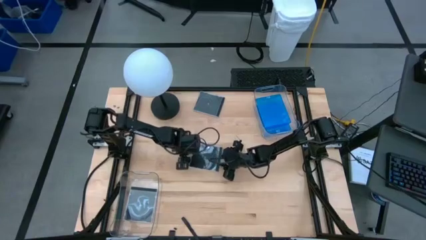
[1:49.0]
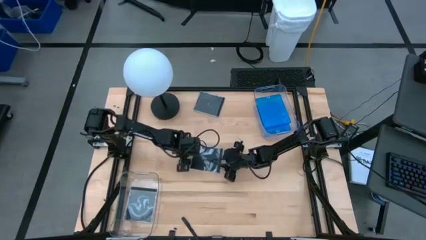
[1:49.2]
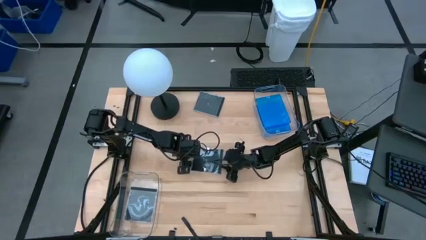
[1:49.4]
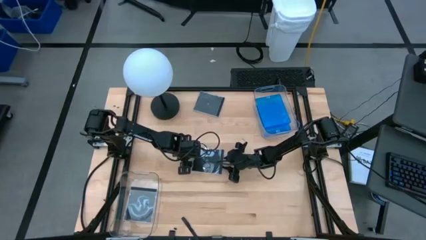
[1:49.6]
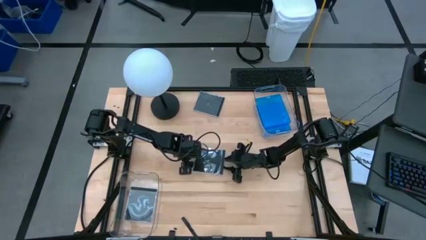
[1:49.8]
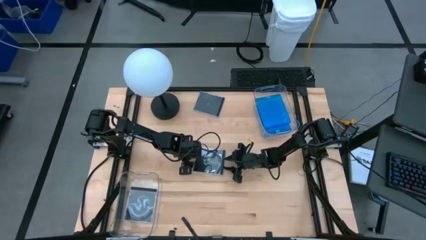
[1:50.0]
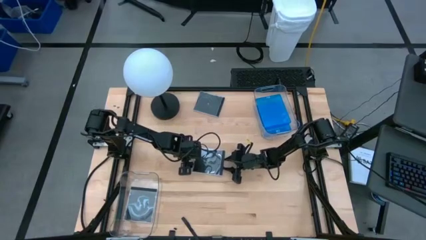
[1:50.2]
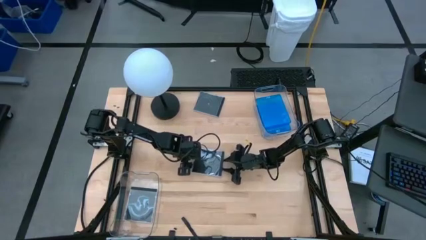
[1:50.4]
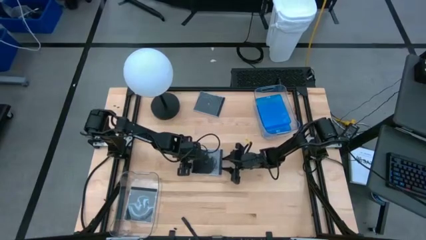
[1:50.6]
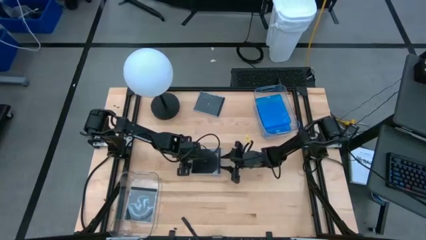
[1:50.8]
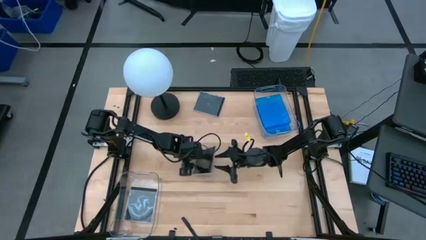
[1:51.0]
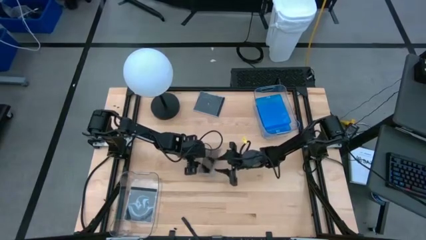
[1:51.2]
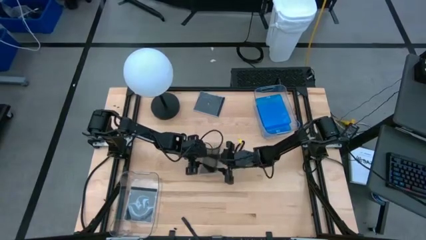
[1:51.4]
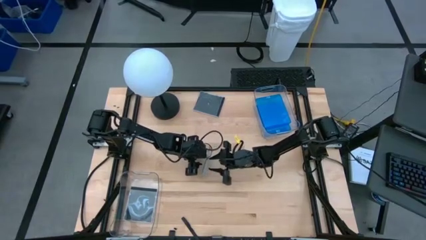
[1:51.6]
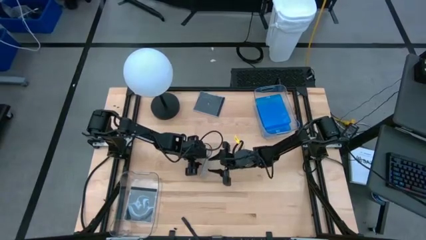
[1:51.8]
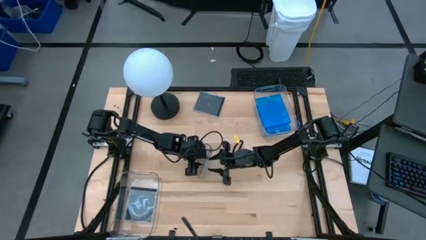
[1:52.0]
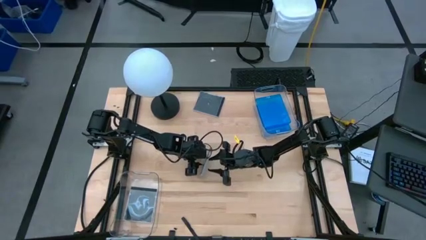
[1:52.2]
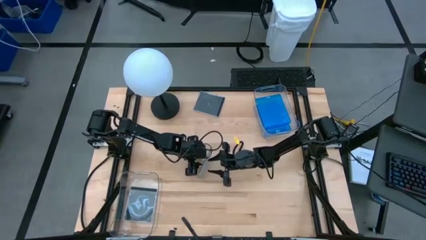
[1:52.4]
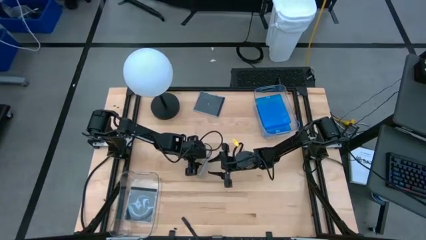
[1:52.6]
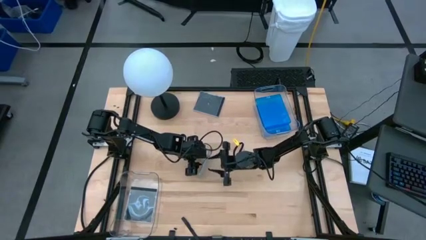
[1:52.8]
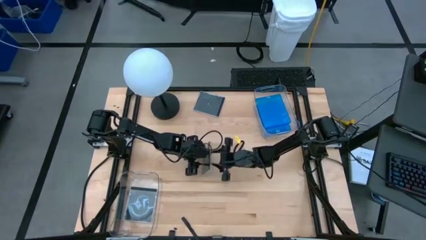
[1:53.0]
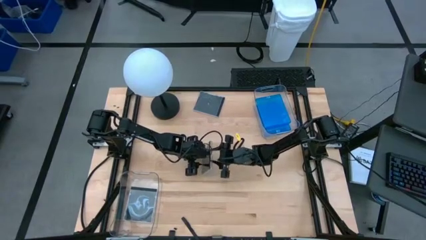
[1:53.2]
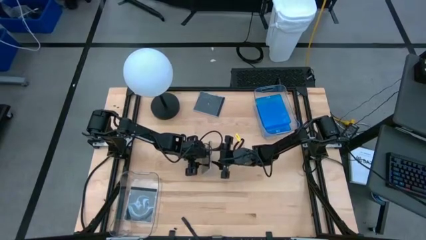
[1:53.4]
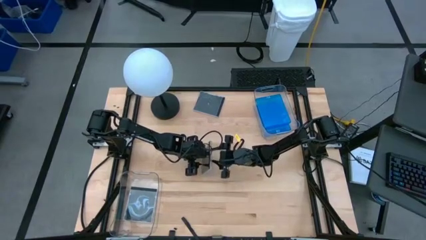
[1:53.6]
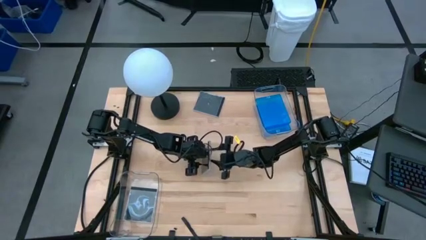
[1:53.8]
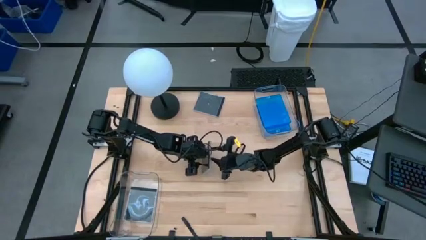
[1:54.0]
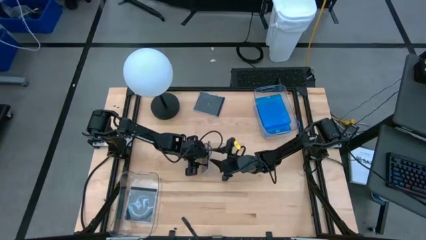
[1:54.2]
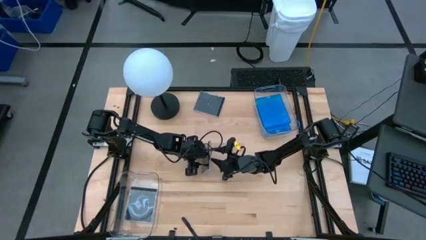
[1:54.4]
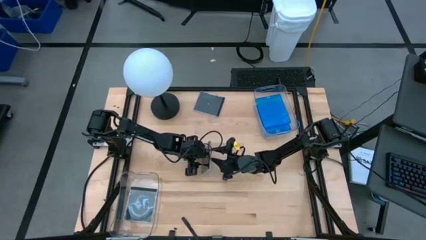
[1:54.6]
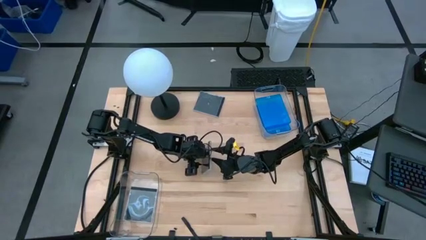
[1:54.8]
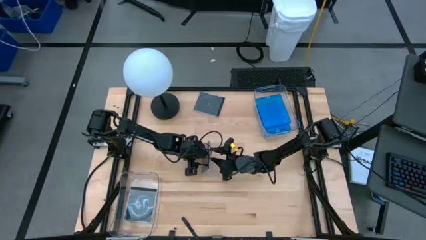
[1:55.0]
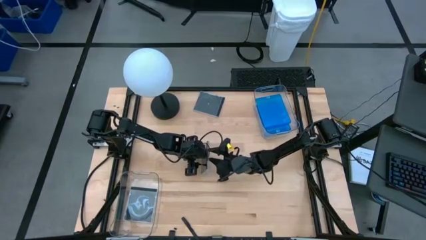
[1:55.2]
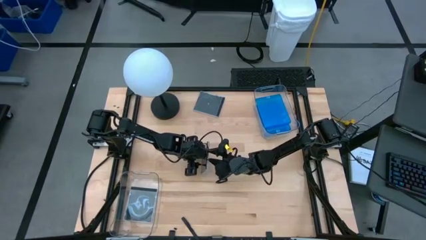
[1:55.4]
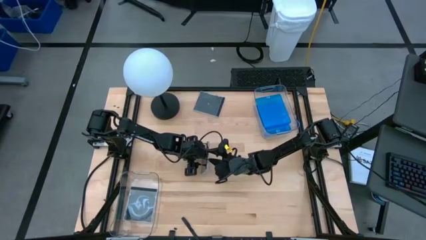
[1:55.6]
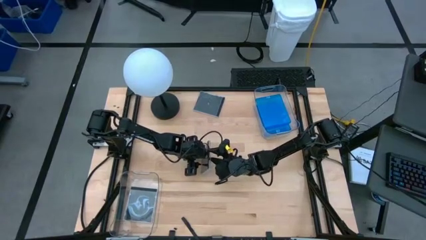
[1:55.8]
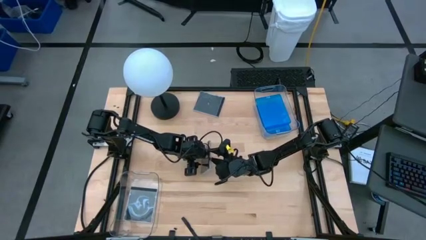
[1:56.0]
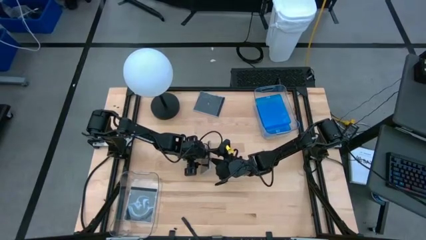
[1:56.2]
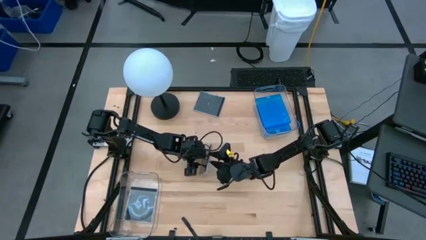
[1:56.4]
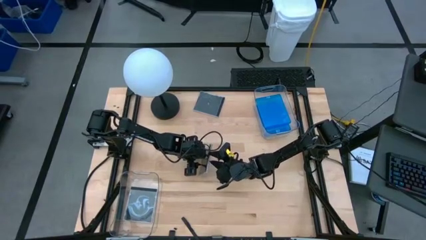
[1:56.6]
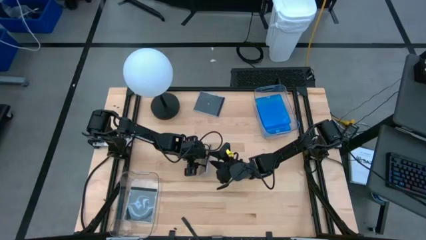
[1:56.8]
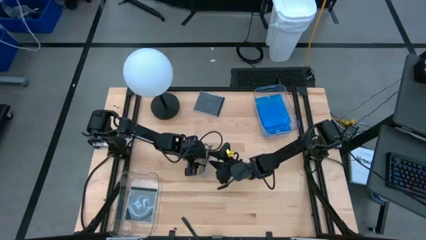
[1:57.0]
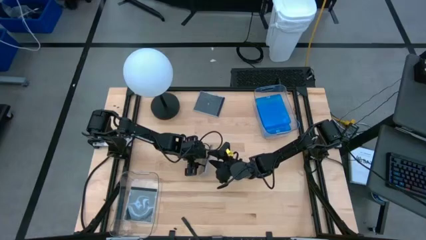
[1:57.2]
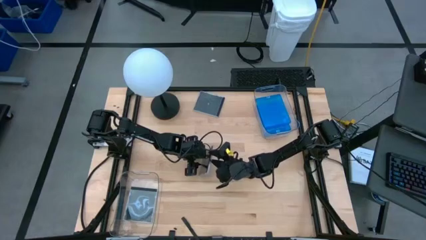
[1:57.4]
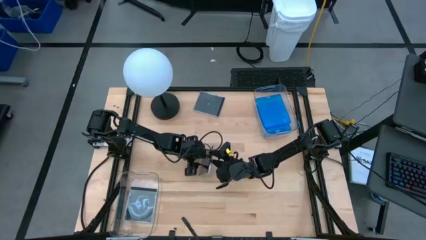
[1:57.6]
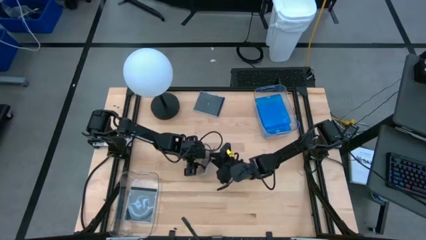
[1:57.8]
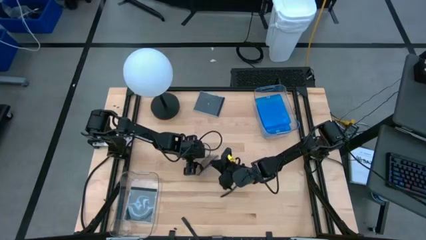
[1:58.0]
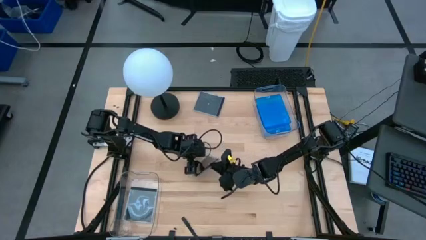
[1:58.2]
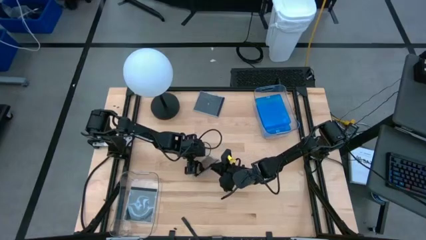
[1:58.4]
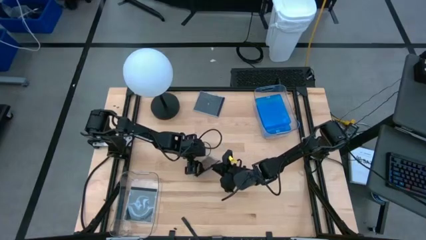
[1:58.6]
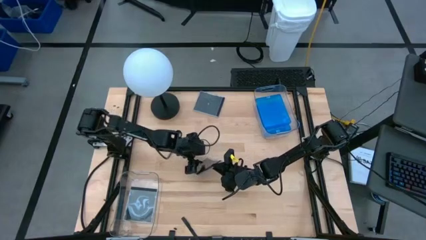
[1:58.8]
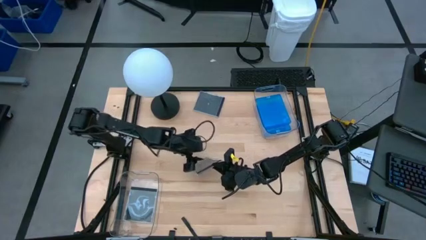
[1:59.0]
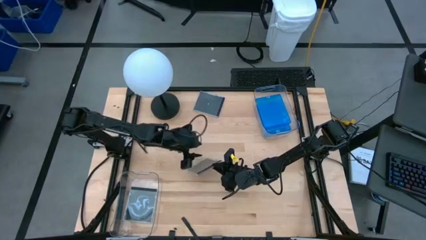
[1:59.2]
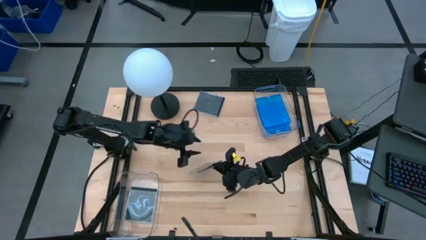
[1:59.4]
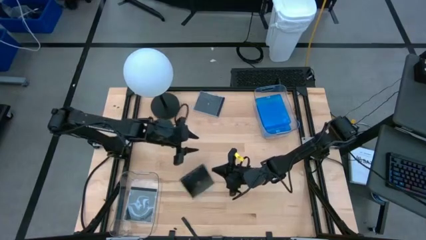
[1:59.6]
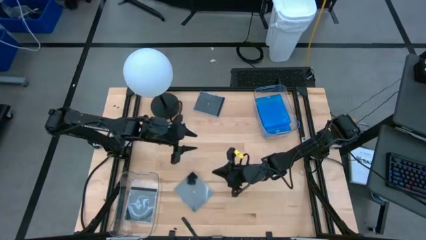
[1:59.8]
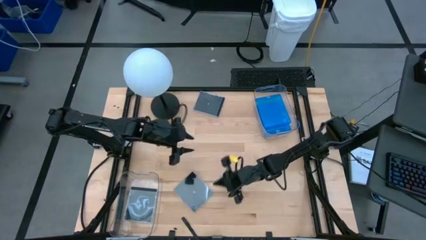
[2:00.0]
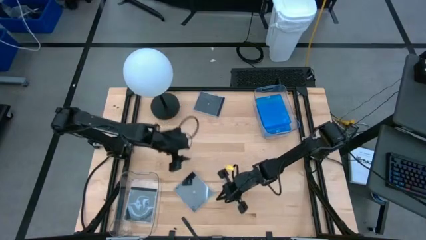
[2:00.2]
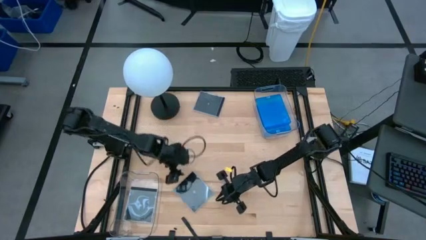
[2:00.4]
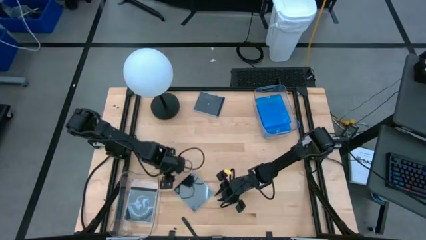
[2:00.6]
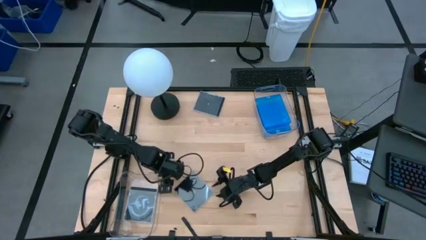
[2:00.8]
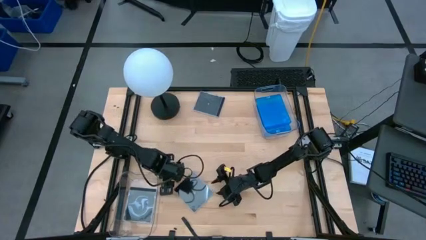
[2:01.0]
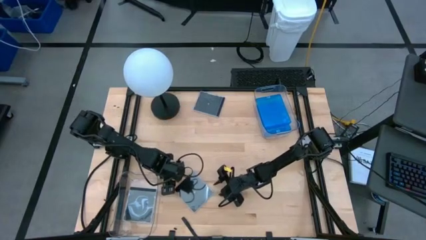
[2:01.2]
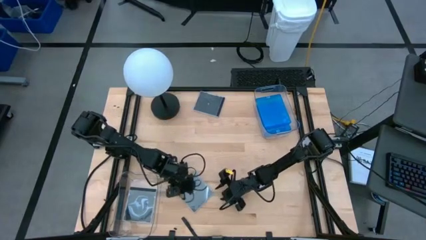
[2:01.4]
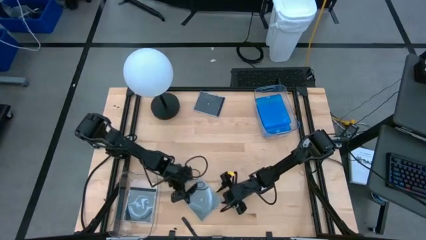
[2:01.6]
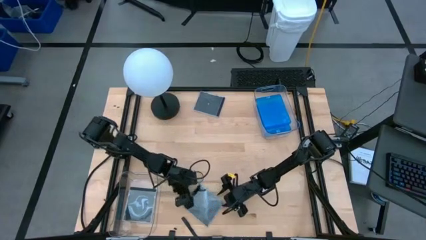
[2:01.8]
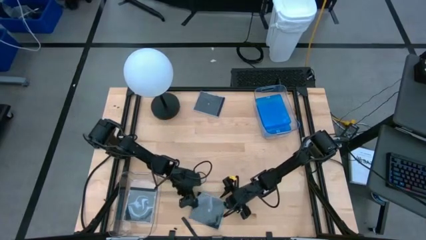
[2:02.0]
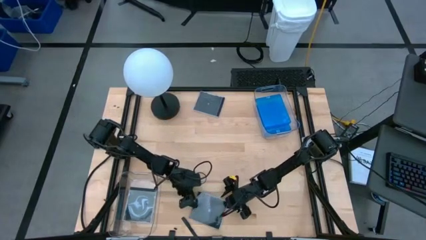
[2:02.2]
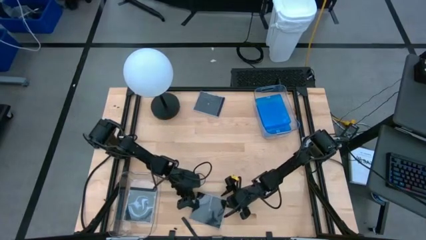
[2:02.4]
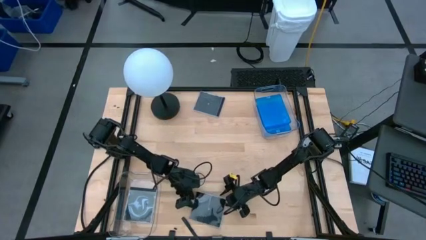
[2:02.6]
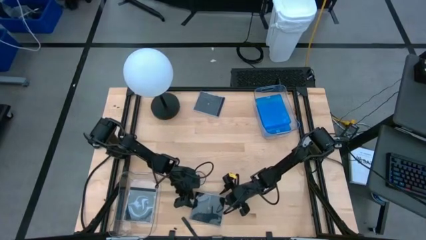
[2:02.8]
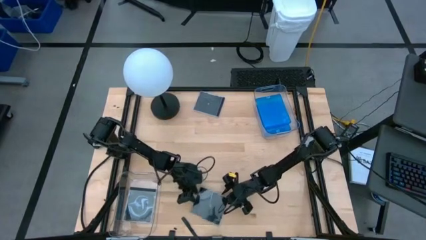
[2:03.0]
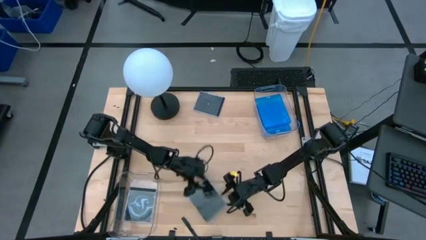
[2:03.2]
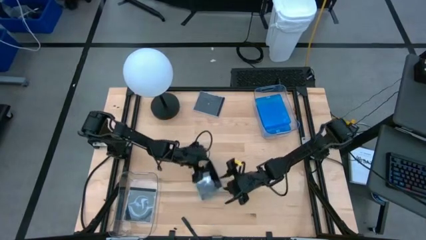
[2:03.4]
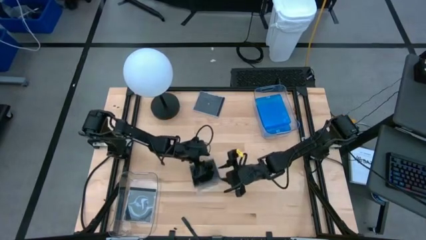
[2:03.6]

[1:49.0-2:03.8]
Task: Pick & place jewel cases by type
Put the bottom black CD case into the bottom transparent bin

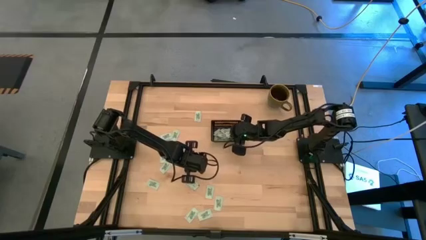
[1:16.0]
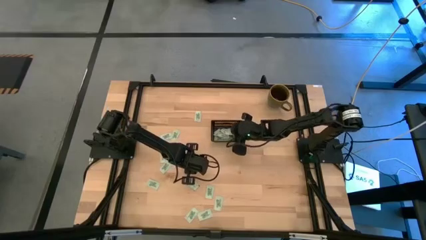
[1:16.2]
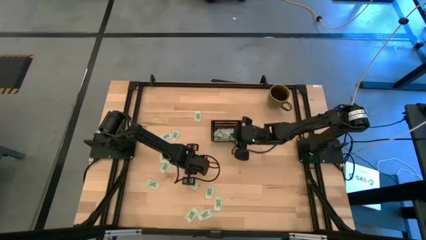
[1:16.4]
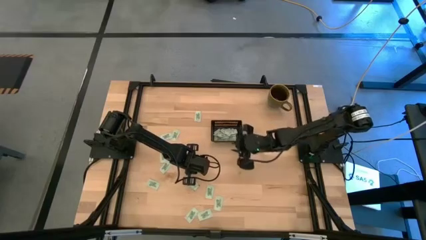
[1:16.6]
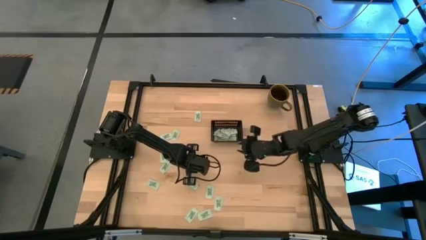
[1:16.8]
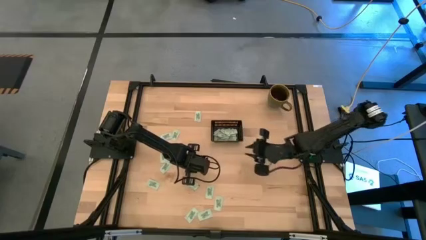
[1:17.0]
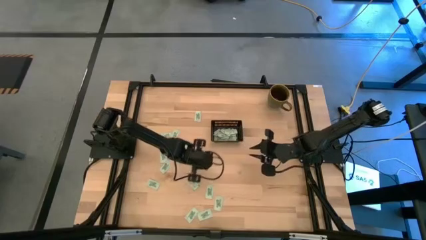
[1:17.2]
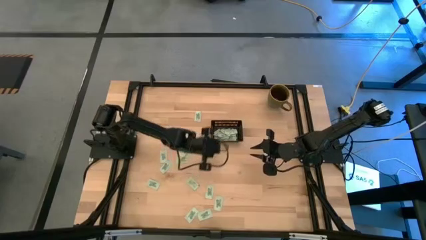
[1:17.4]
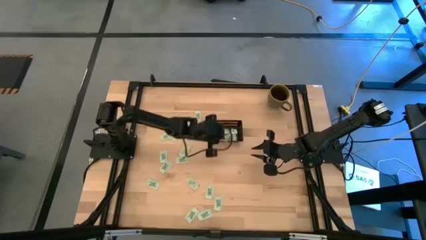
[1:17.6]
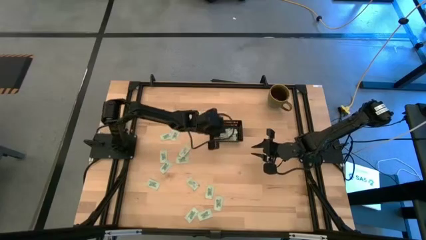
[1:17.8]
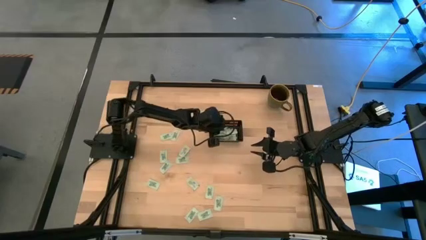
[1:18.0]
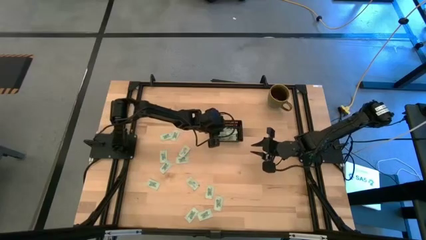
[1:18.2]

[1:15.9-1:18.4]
Task: Pick and place Stevia / Truvia into bins
Put the stevia packet into the black basket
